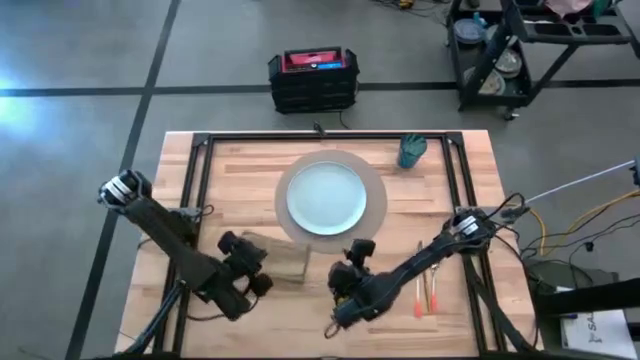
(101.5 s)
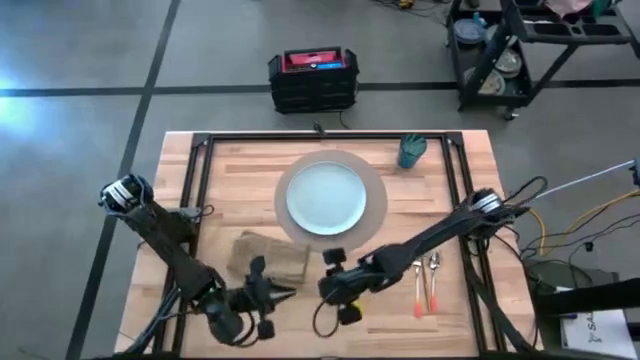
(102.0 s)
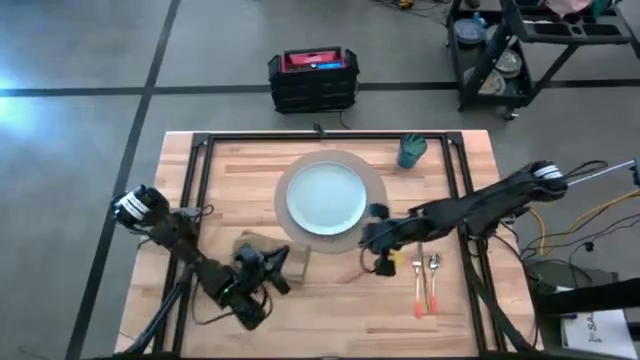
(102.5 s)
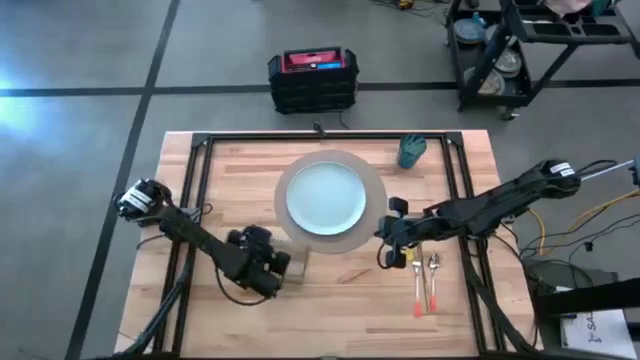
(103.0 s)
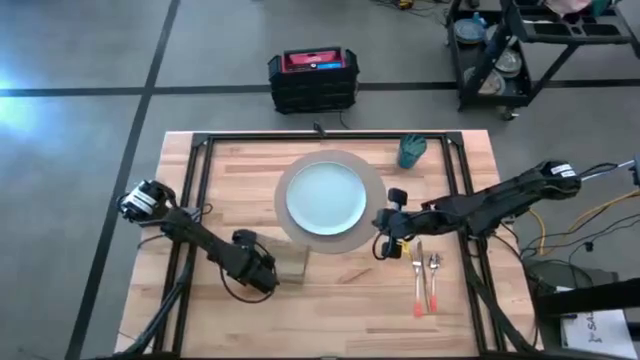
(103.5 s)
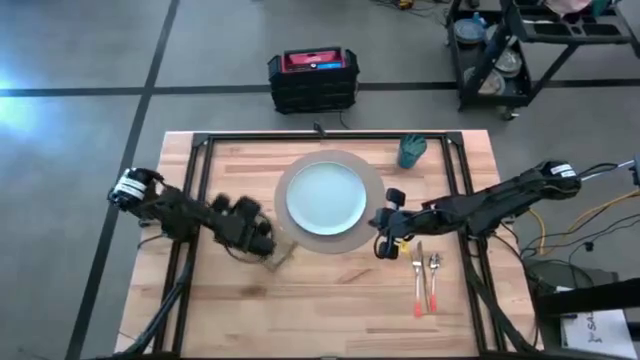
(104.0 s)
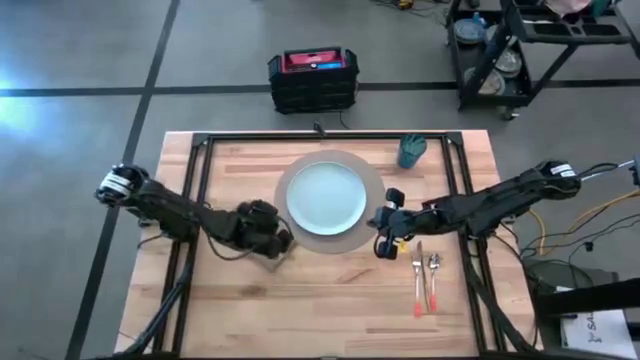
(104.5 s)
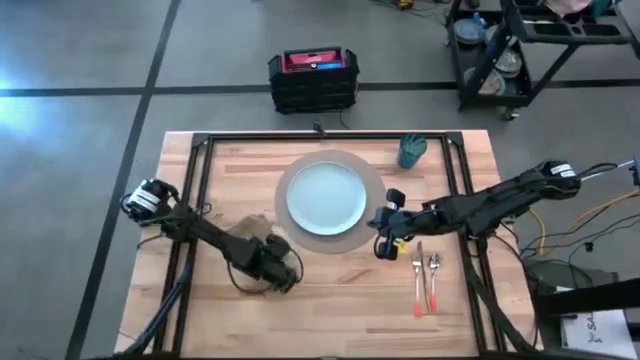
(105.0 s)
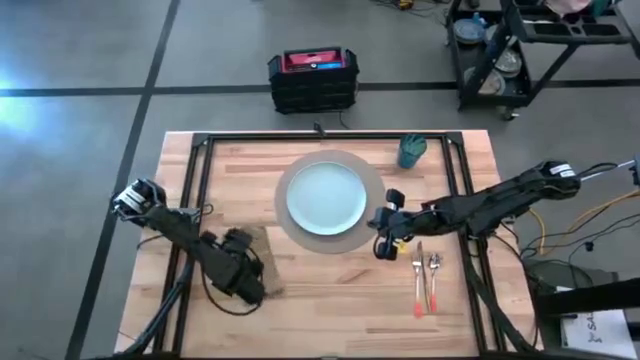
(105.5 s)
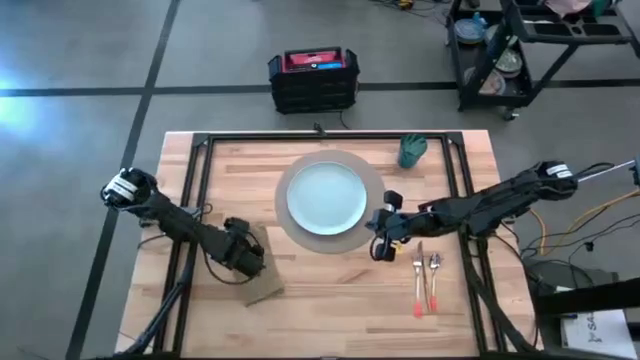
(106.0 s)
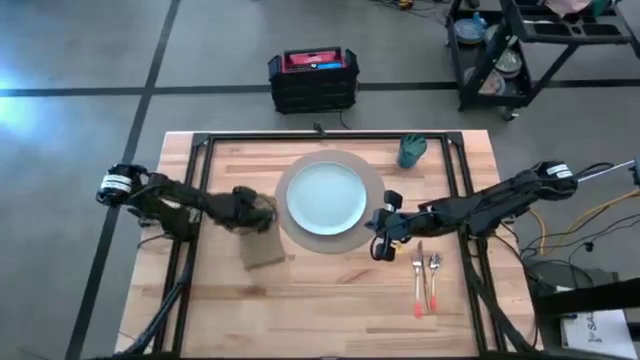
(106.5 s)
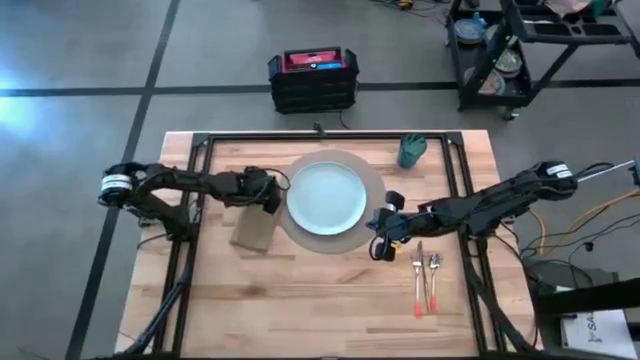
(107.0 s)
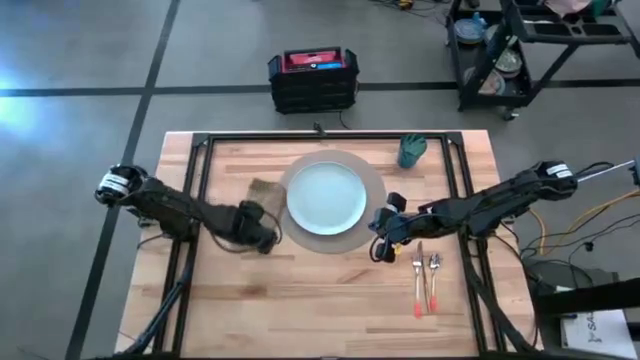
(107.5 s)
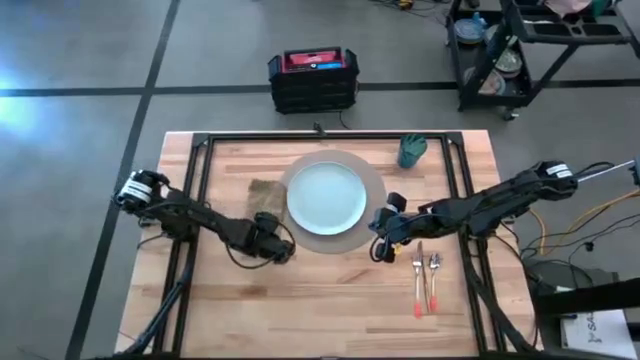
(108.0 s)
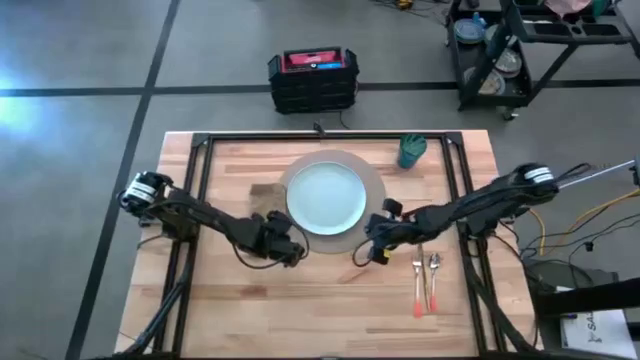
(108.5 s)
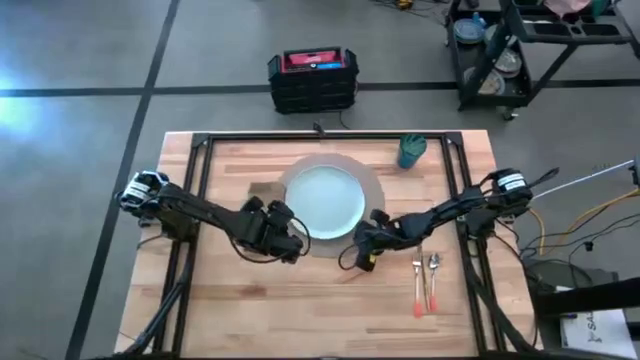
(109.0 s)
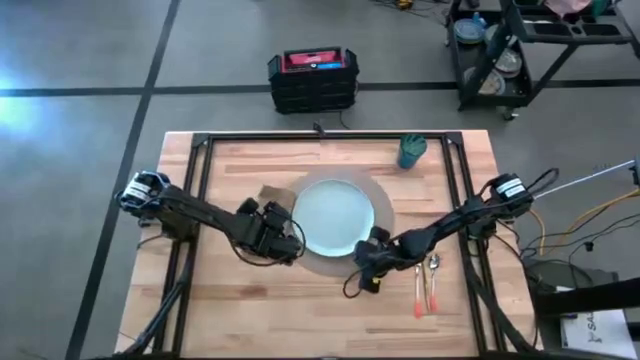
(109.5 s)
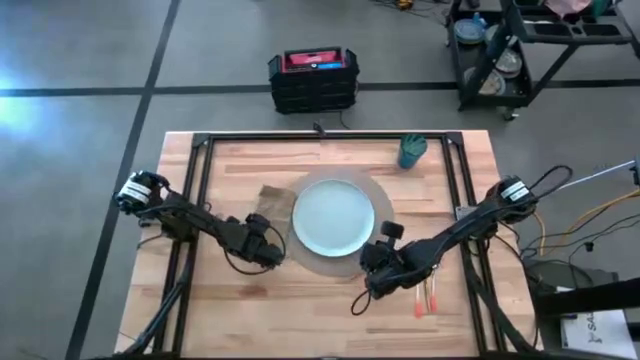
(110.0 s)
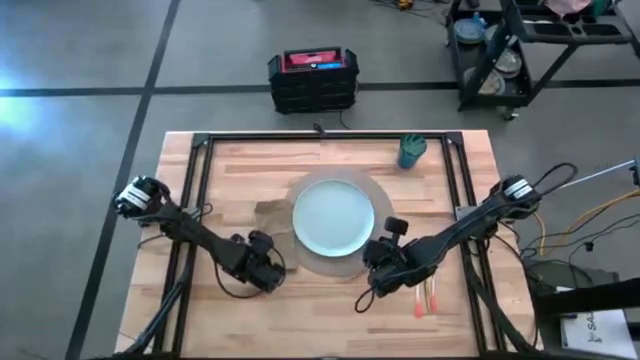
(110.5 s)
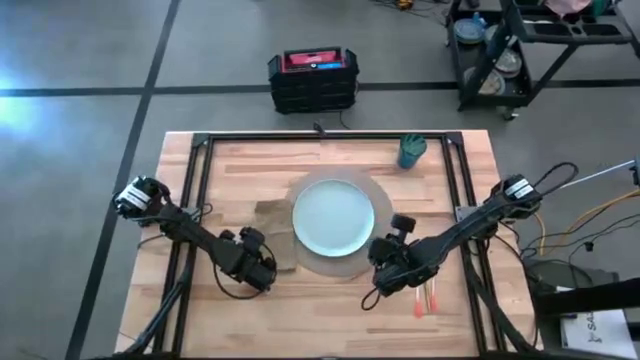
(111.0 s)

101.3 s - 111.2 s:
Task: Set table place
Move the table napkin beside the table mat

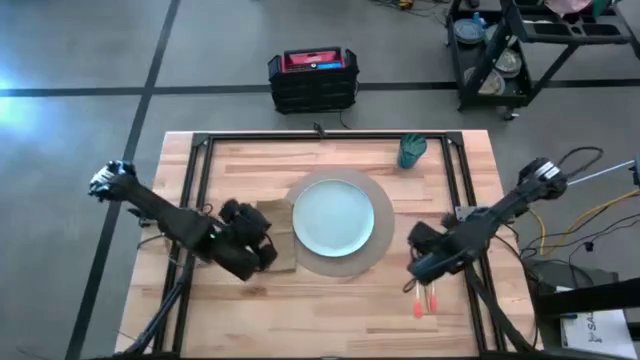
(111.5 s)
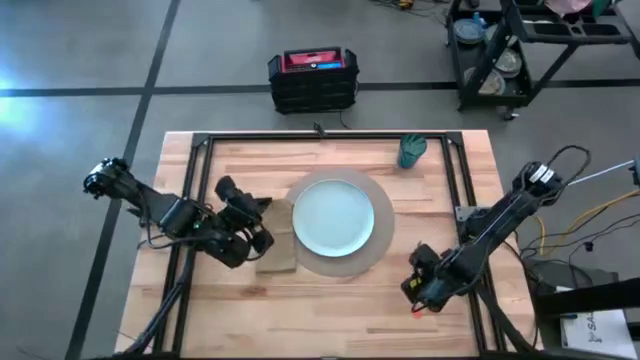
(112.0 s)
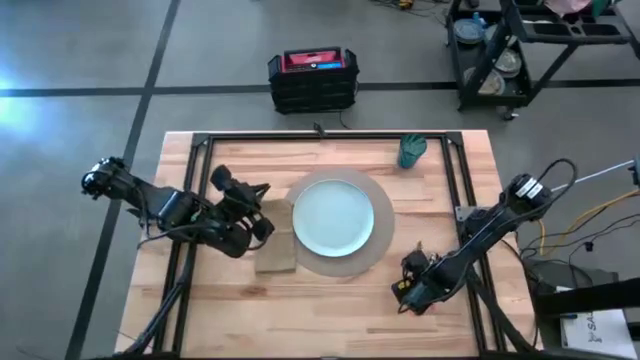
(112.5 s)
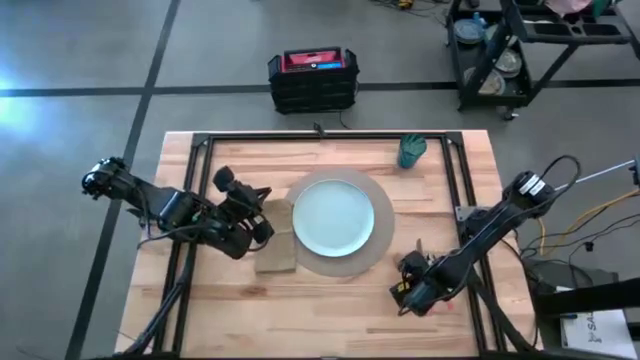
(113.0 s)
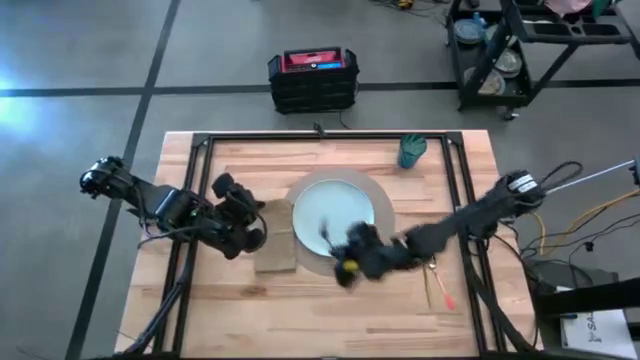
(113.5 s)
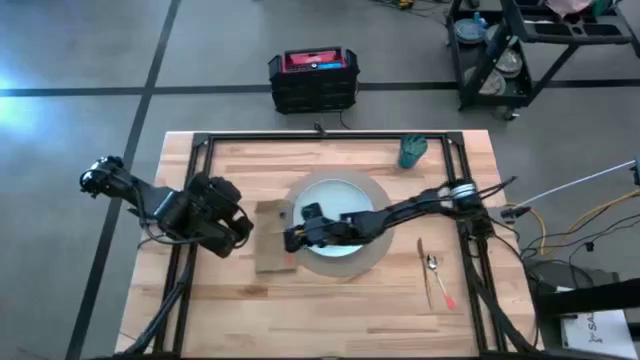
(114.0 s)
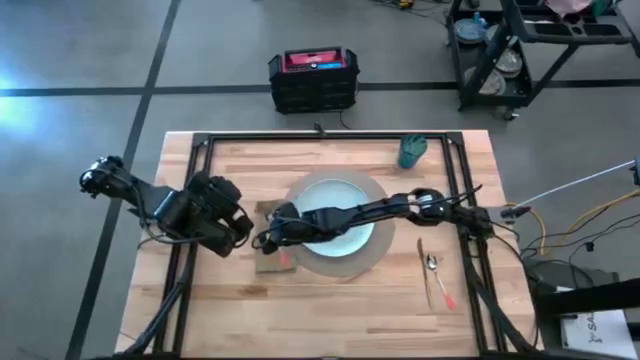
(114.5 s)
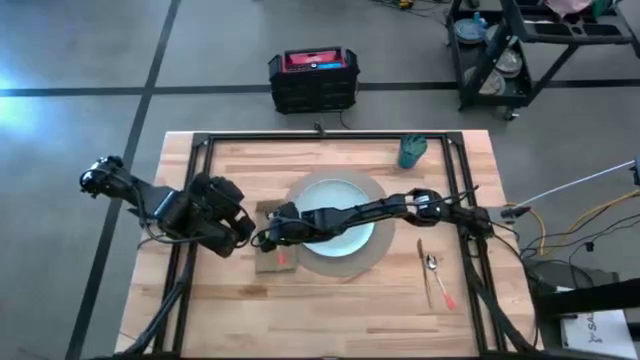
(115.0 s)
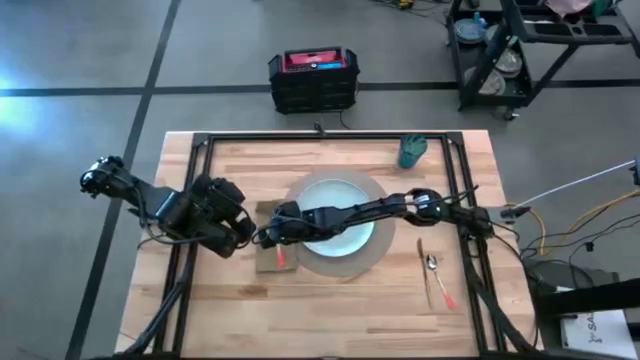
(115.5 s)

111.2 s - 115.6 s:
Put the fork on the table napkin

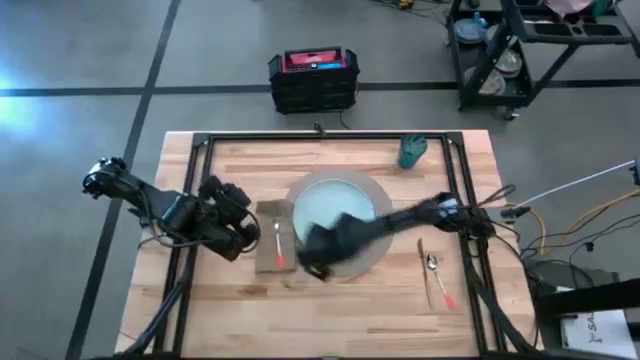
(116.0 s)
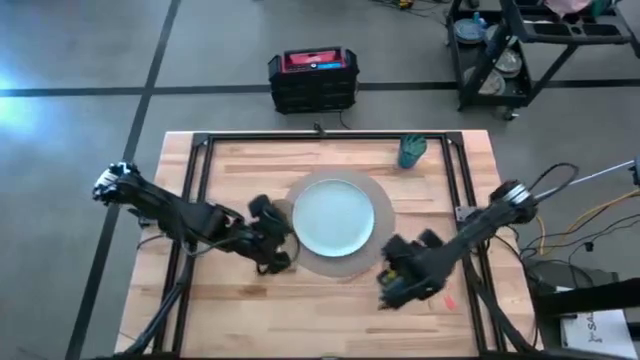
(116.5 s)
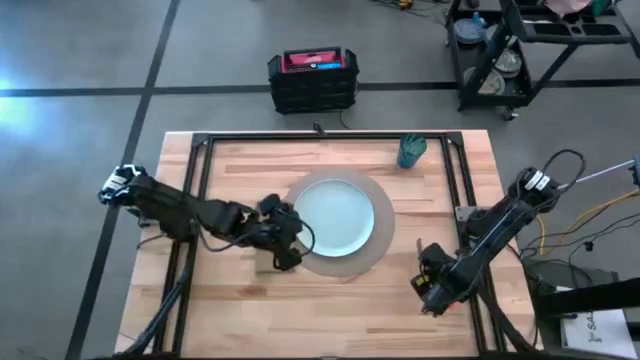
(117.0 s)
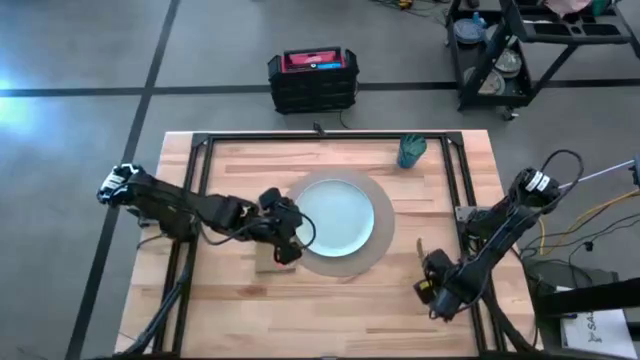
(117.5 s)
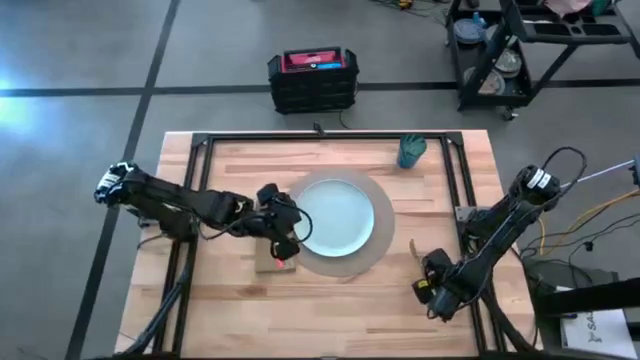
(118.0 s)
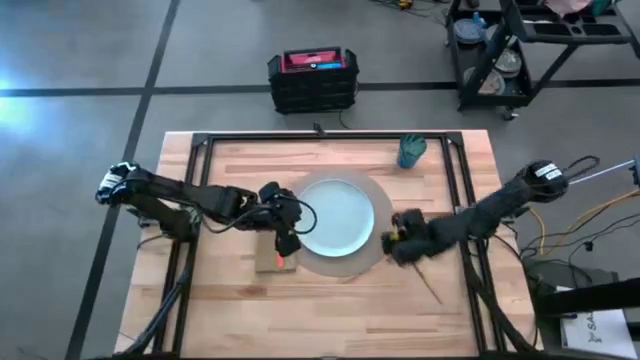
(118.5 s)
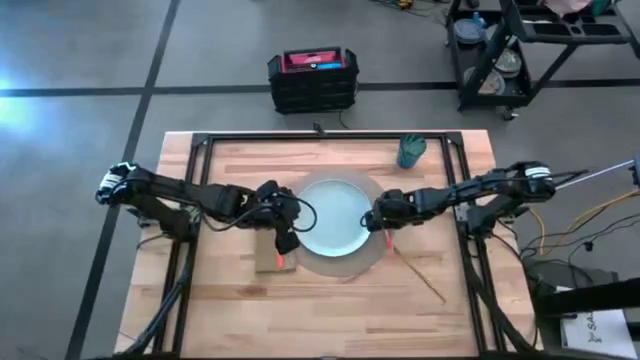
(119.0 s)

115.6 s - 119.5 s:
Put the spoon beside the plate on the table mat

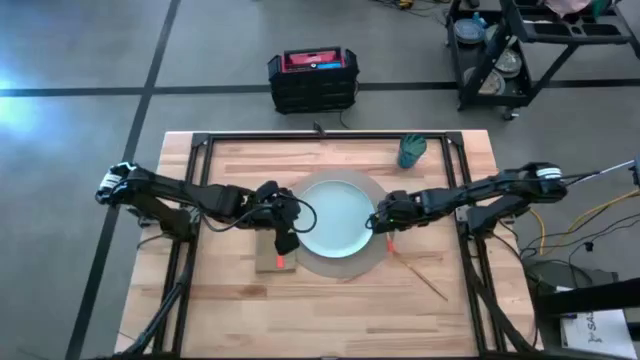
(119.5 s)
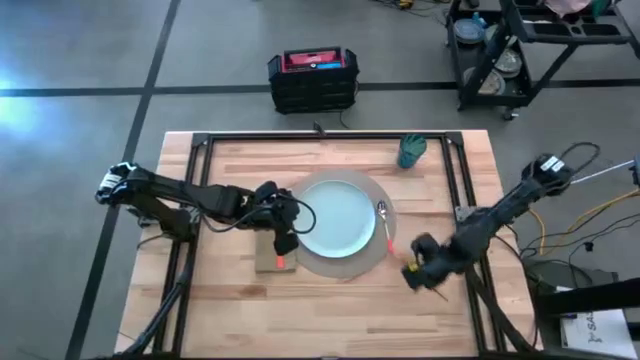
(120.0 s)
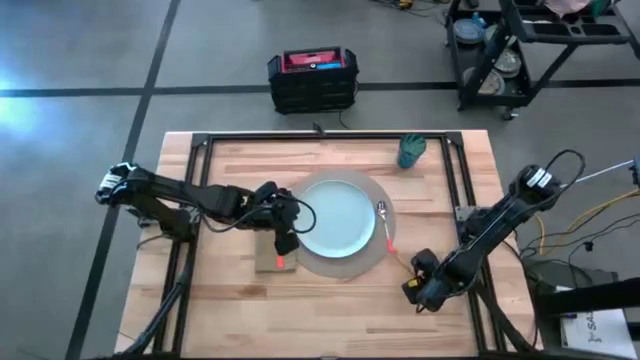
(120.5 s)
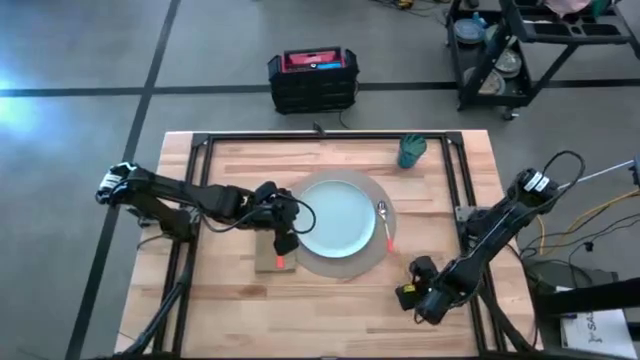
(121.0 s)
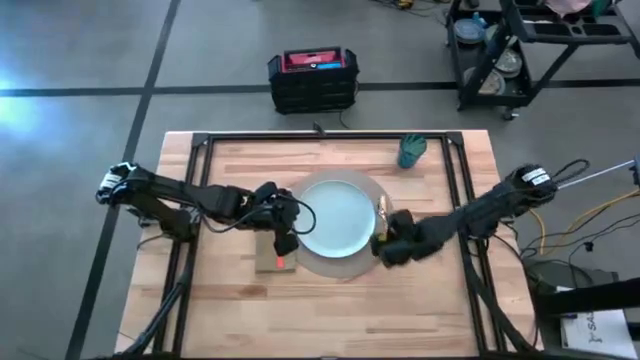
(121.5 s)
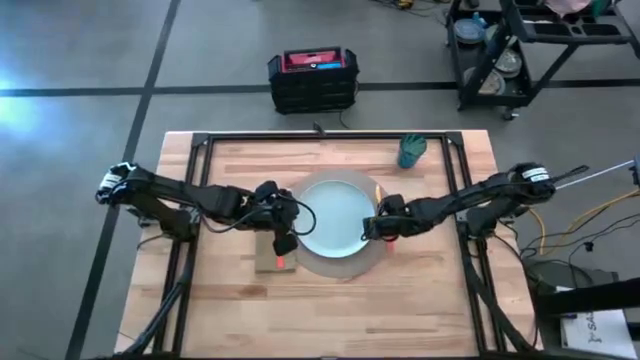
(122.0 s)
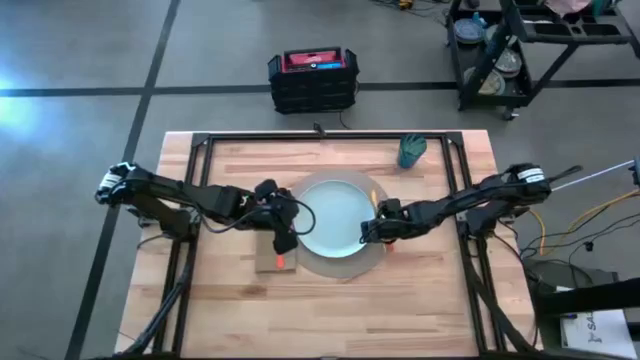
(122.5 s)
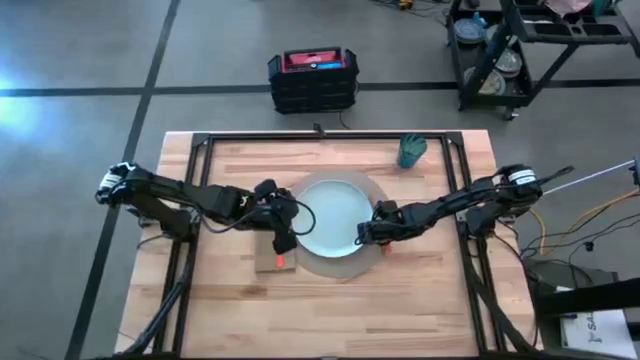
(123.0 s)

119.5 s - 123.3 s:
Put the table knife beside the plate on the table mat
